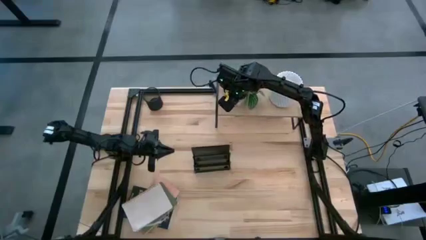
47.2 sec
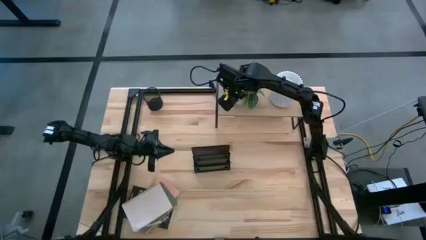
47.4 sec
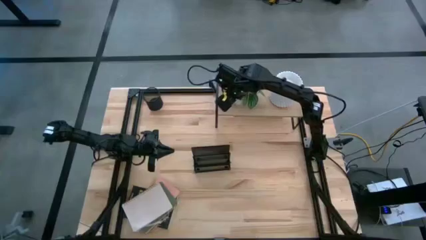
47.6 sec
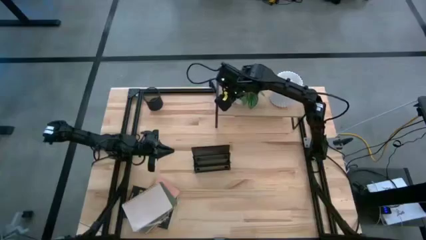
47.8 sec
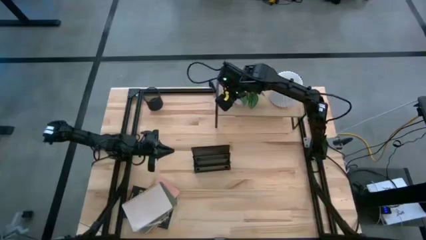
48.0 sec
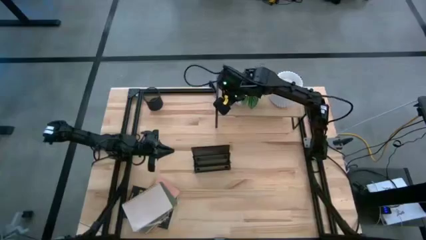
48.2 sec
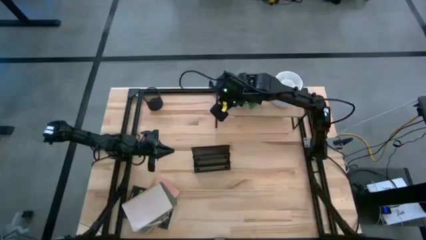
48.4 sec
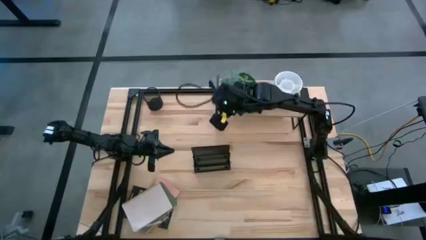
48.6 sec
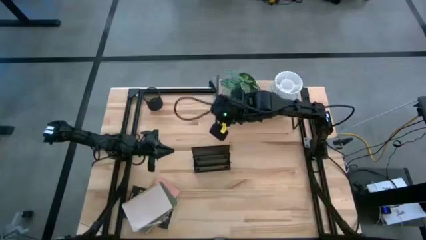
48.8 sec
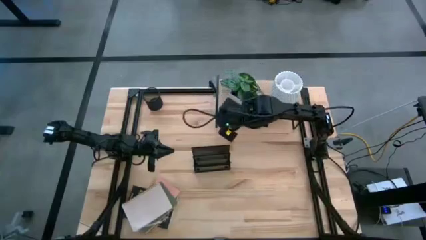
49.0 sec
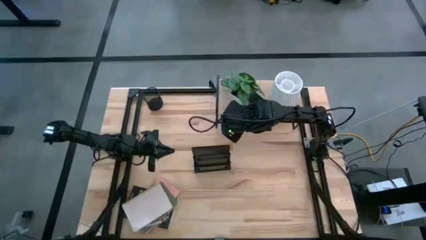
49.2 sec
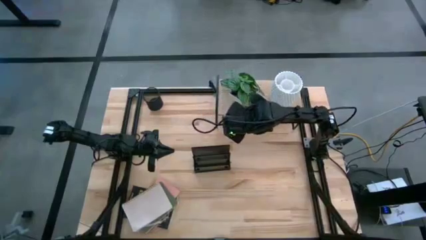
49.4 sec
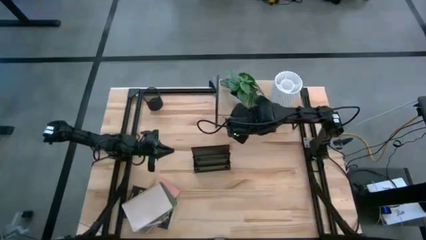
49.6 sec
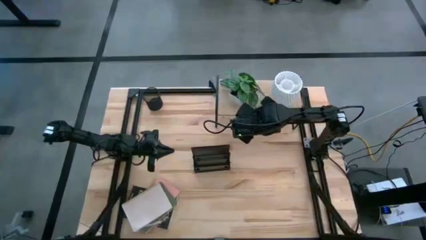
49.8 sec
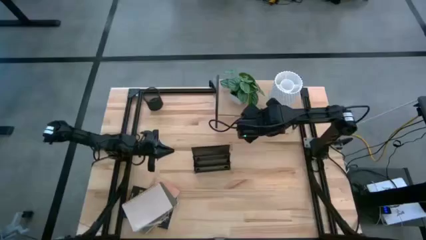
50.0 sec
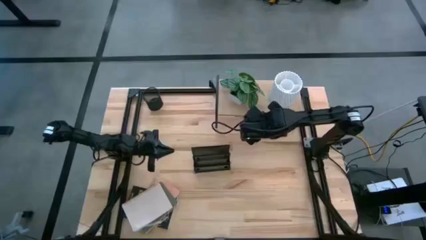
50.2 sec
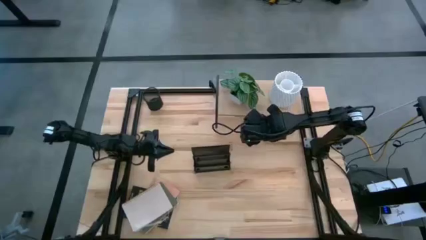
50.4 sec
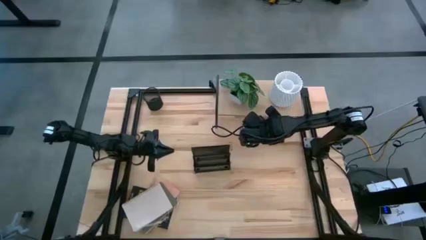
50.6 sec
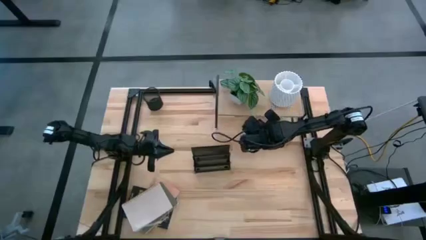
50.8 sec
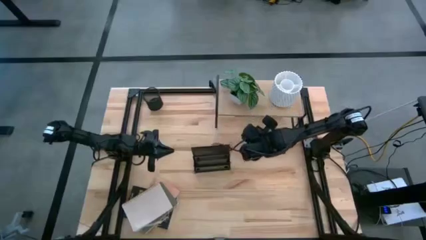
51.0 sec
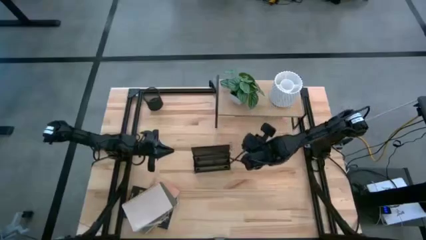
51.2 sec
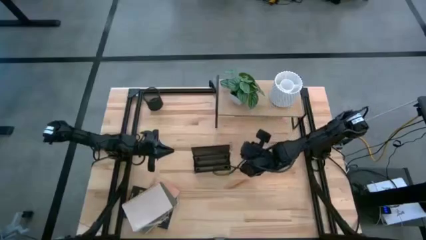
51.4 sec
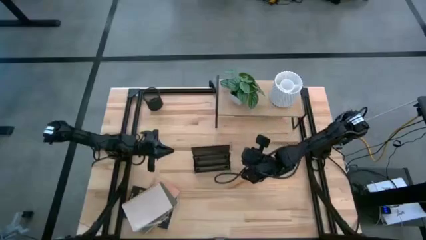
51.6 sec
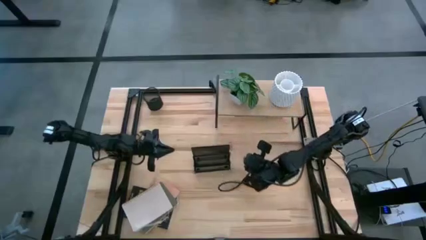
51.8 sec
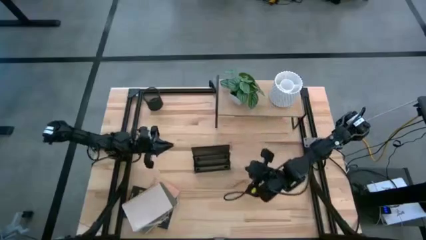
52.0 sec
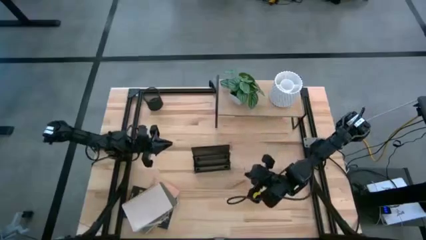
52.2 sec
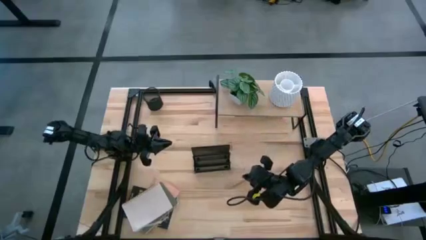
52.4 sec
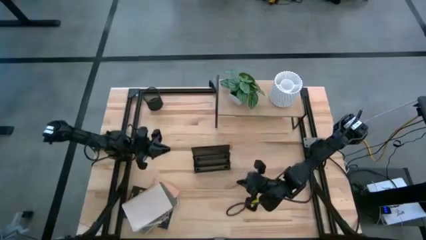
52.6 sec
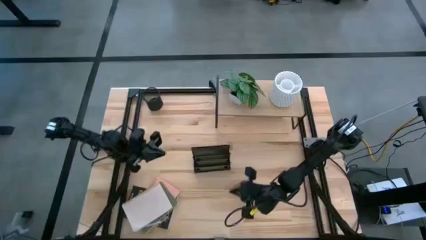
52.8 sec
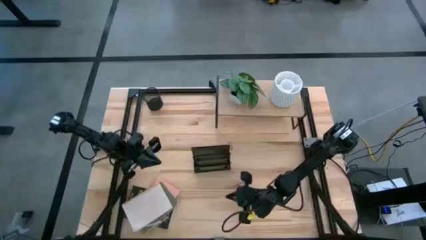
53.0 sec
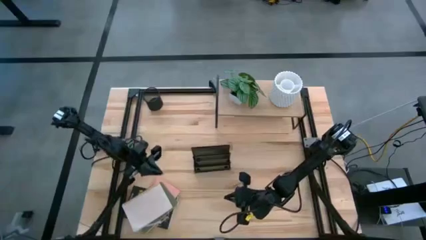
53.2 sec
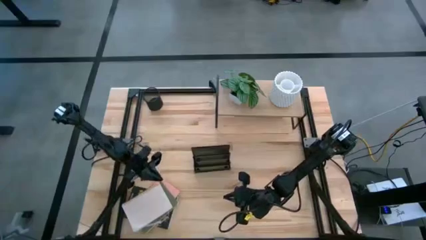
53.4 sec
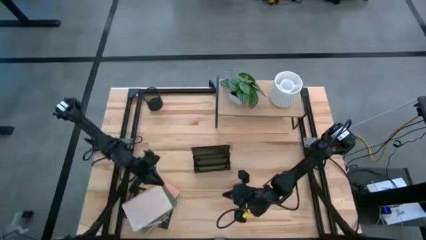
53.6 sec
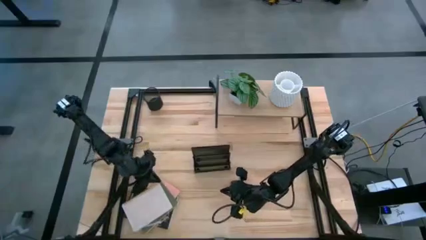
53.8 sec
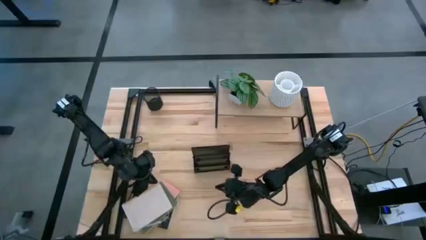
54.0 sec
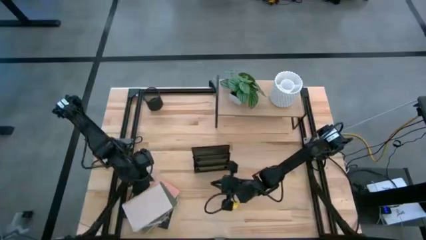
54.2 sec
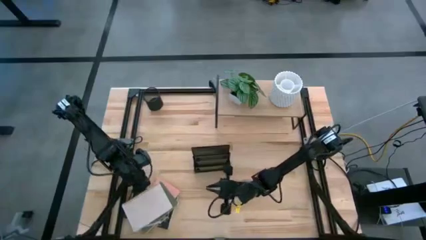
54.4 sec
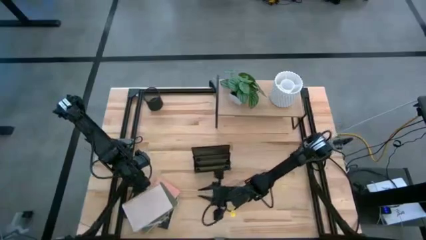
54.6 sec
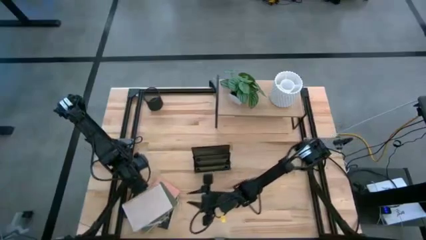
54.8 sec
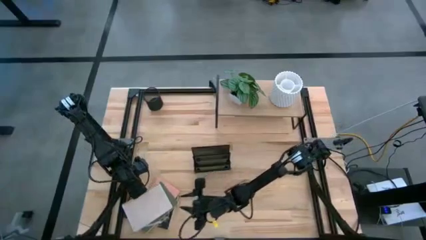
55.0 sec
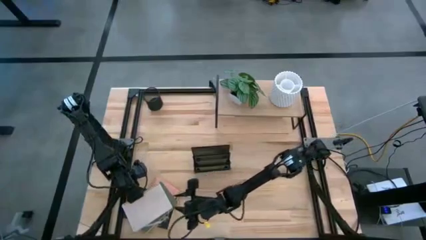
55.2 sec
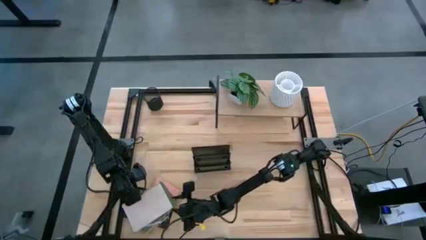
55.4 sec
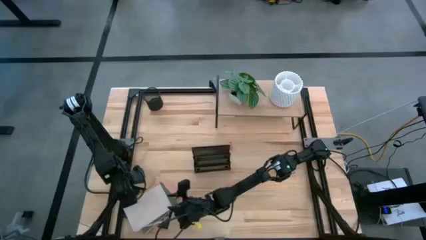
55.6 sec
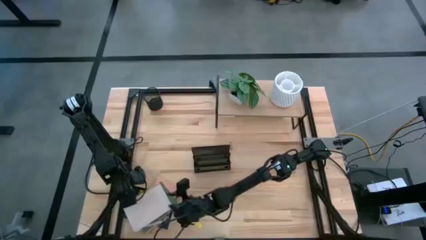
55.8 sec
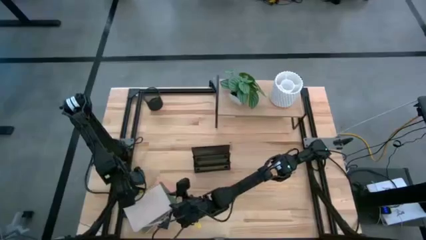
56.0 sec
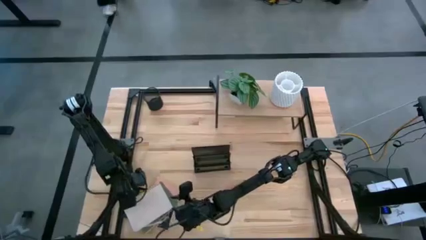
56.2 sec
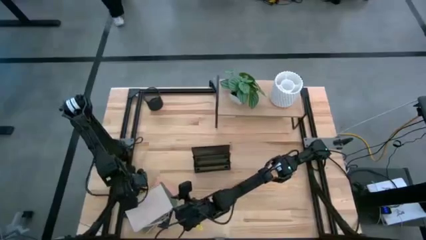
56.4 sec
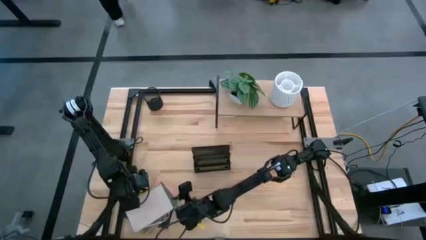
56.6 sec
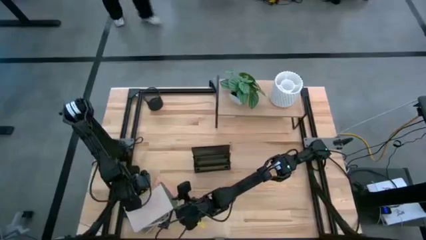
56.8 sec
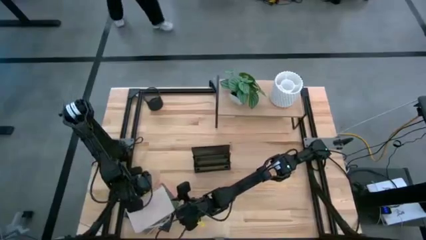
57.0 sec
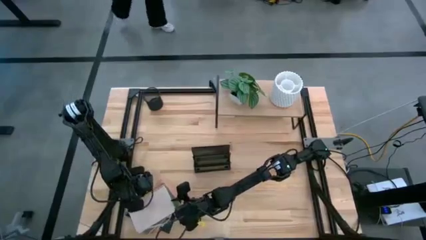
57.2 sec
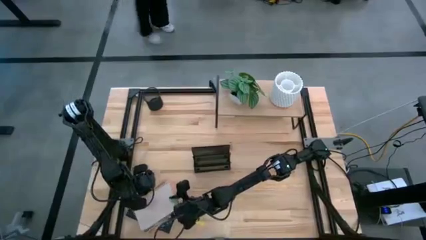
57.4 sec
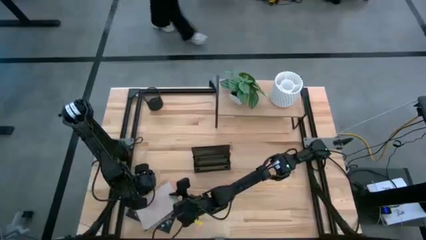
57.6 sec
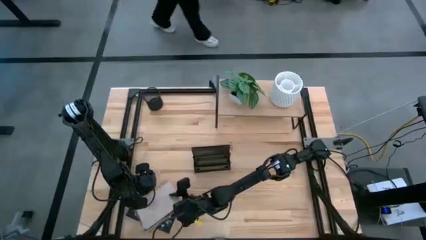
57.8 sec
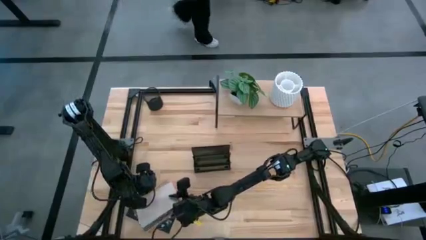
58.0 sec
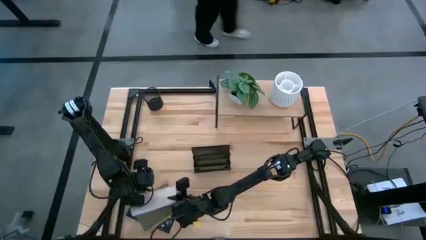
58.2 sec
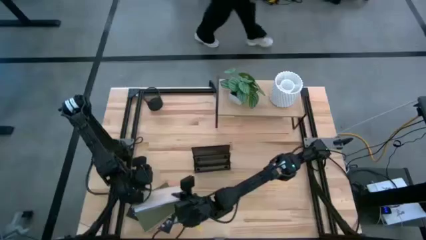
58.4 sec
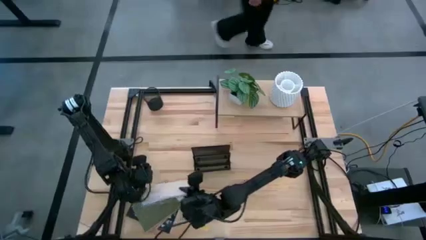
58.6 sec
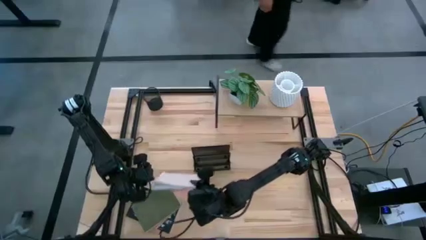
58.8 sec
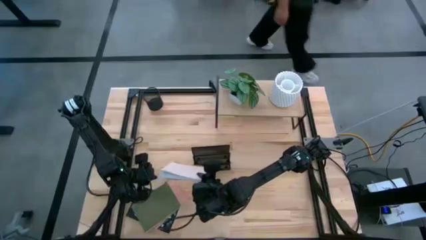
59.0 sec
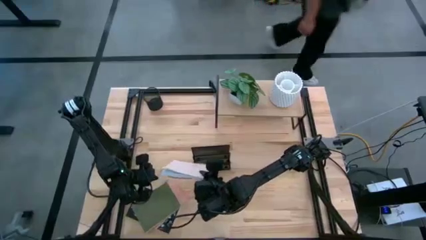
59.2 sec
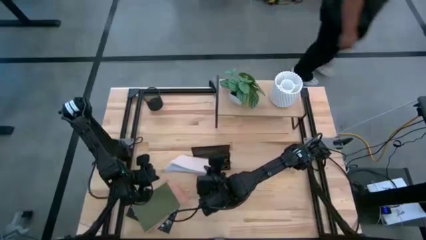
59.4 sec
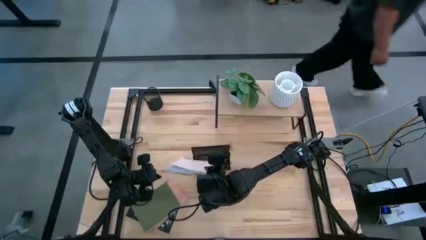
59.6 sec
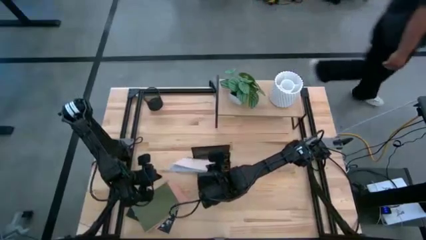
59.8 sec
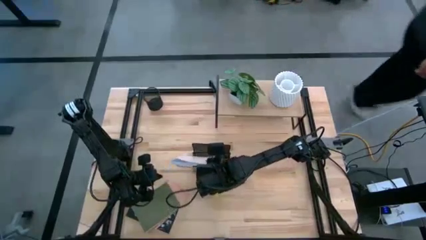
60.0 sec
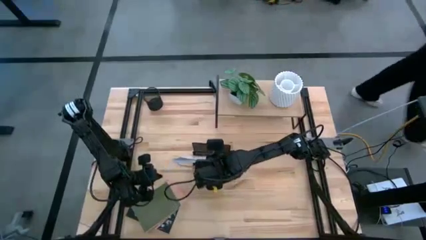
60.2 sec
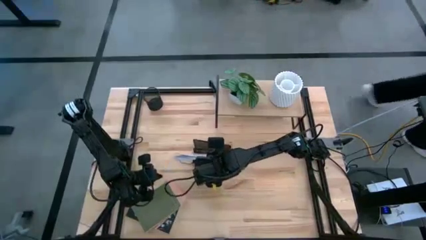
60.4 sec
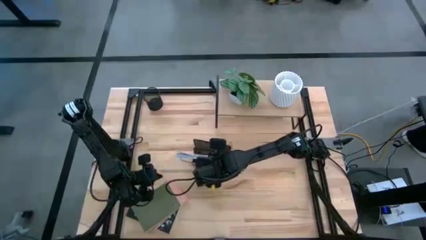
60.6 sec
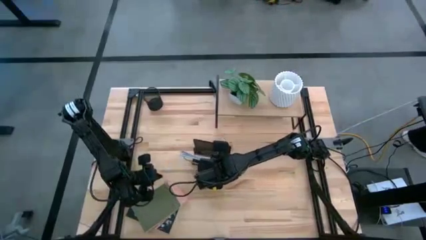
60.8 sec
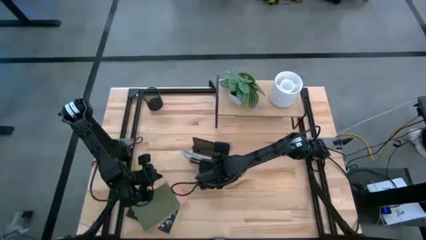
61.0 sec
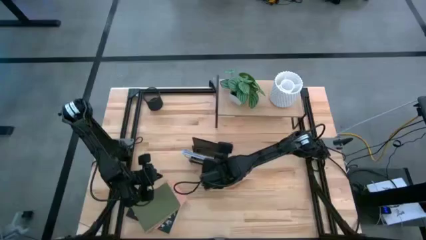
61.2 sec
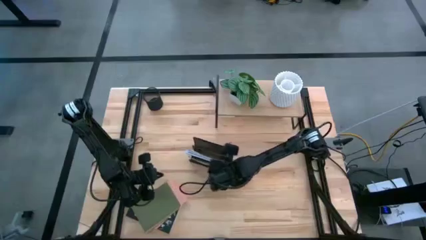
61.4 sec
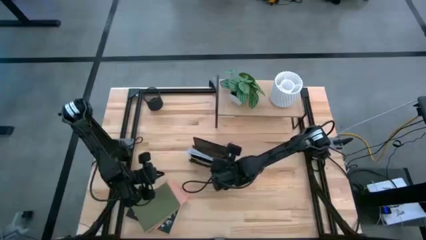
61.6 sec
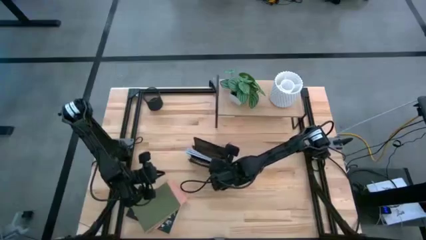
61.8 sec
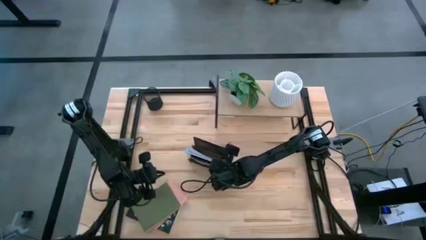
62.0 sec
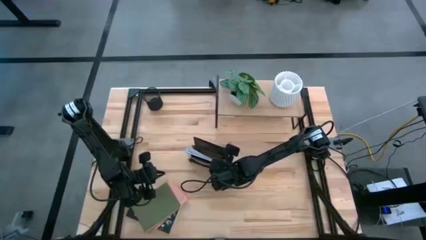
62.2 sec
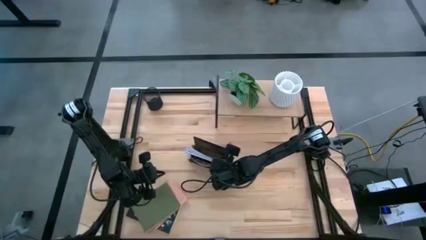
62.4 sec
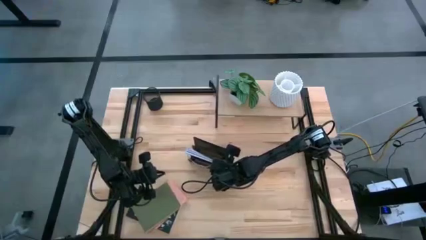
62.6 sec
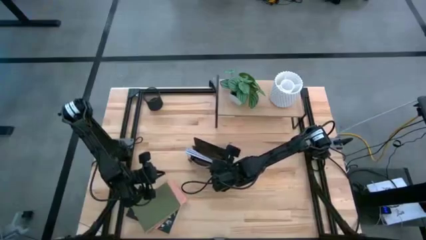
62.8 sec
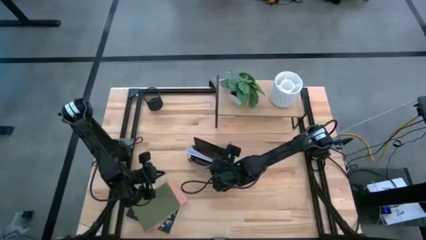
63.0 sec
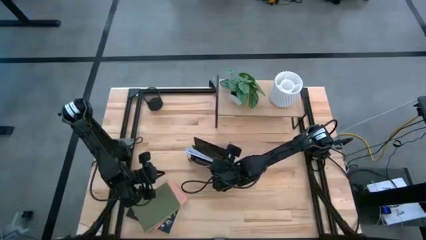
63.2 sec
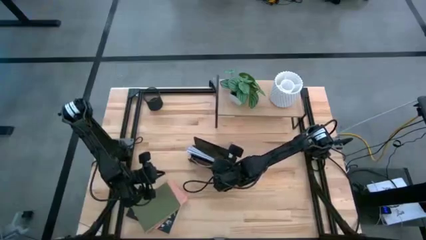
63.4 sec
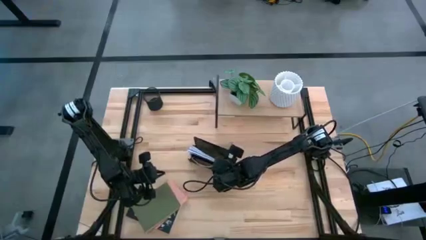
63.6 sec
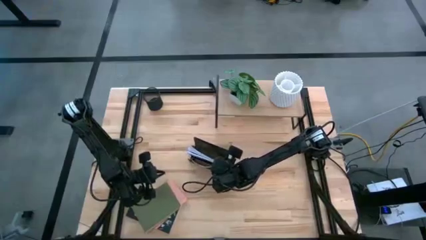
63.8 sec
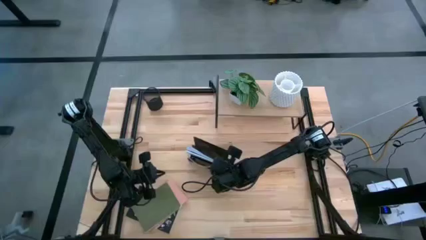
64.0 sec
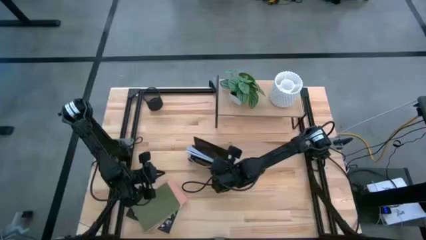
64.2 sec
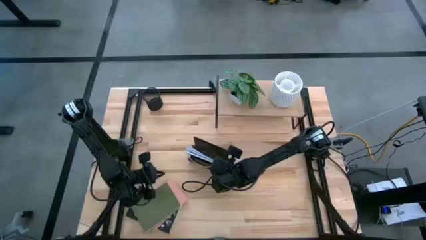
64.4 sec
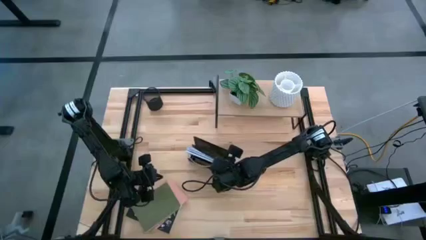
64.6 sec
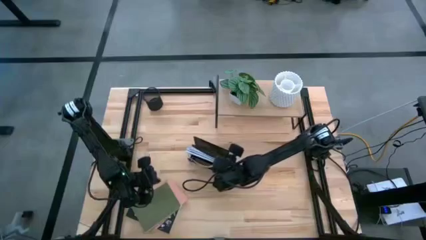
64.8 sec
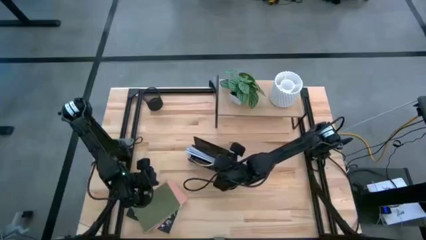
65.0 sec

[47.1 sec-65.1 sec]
Task: Stock shelves
Put the white notebook into the black mesh bookshelf
